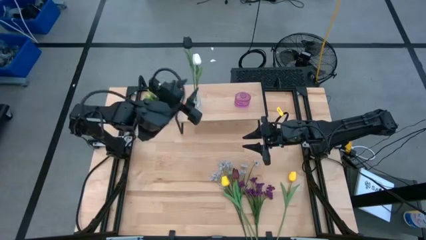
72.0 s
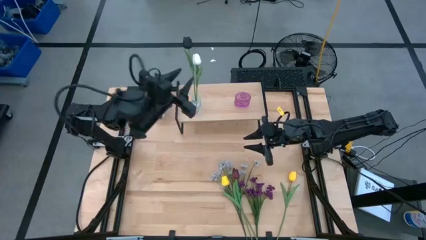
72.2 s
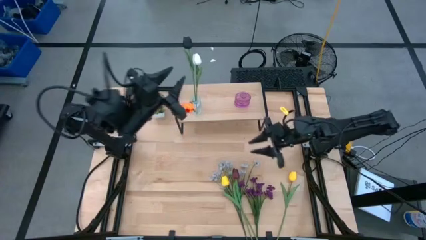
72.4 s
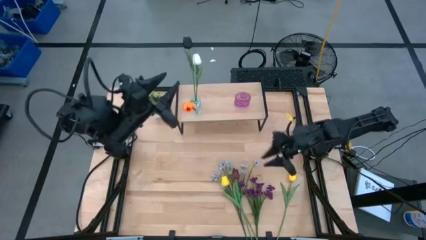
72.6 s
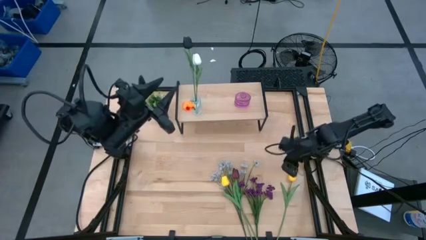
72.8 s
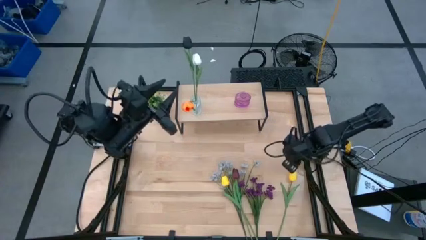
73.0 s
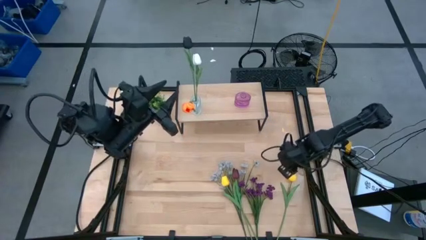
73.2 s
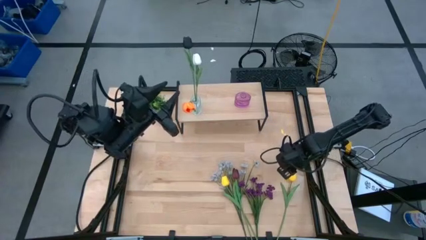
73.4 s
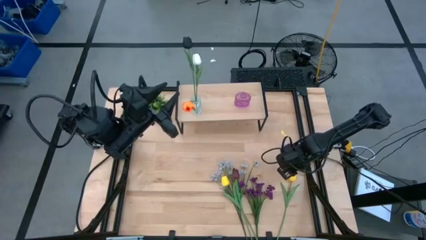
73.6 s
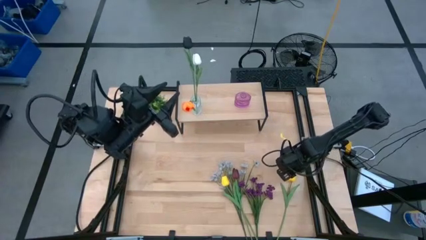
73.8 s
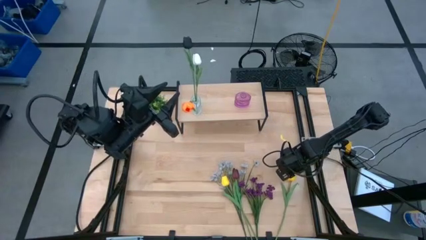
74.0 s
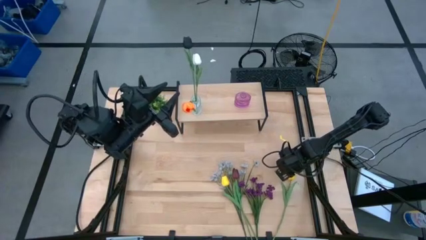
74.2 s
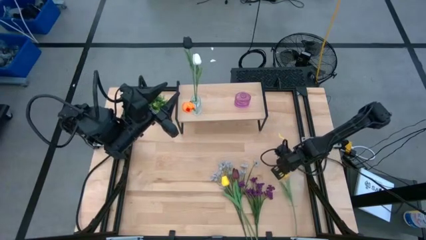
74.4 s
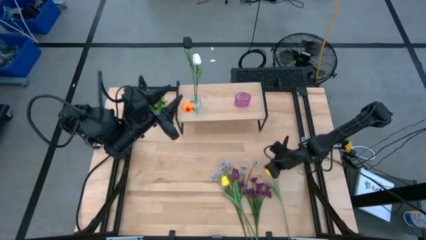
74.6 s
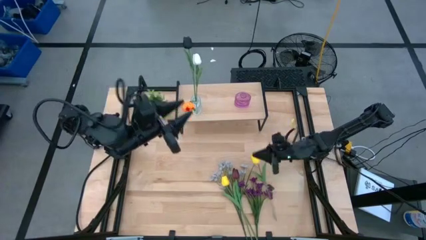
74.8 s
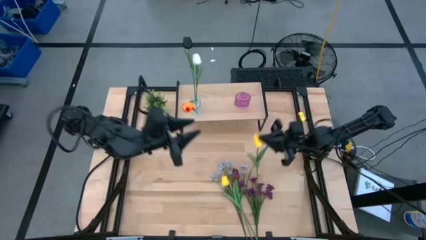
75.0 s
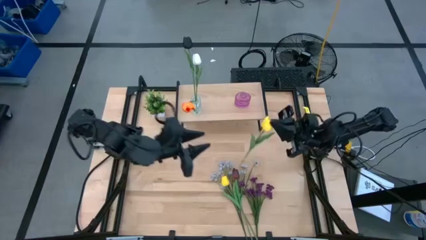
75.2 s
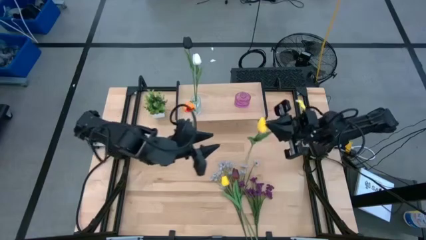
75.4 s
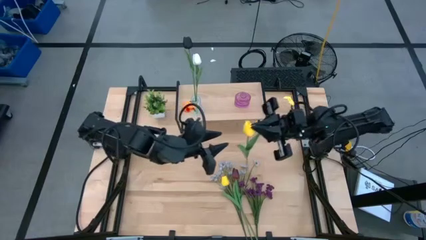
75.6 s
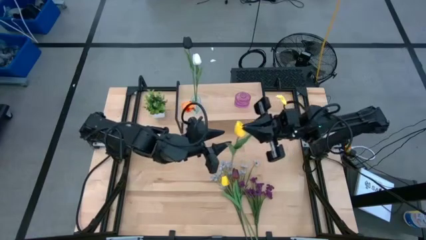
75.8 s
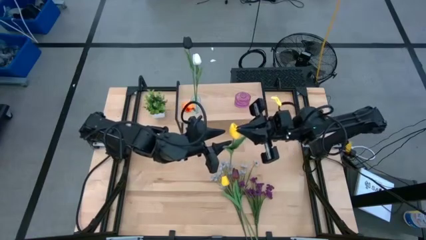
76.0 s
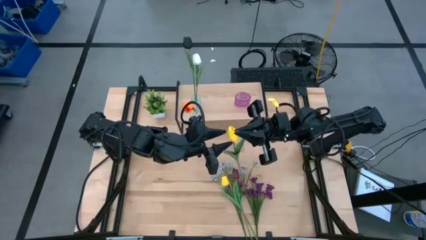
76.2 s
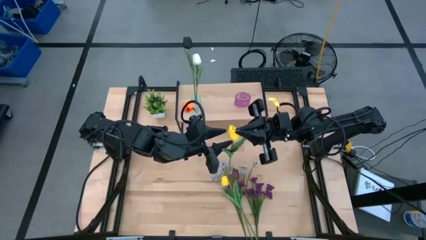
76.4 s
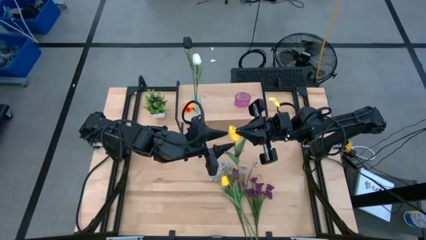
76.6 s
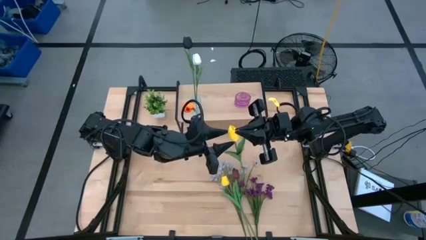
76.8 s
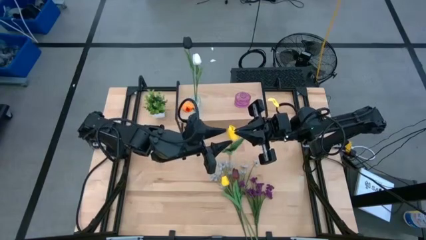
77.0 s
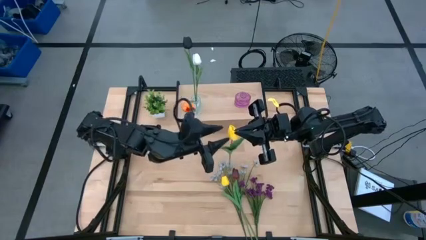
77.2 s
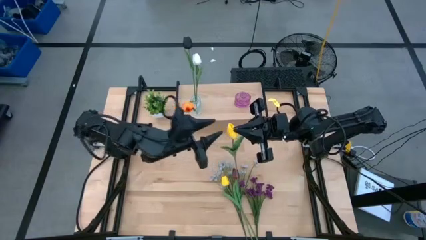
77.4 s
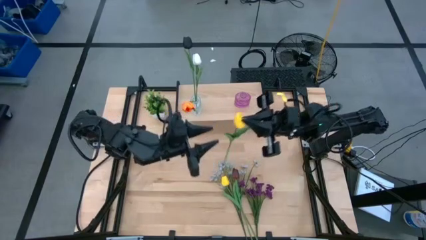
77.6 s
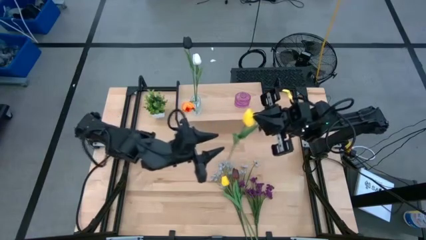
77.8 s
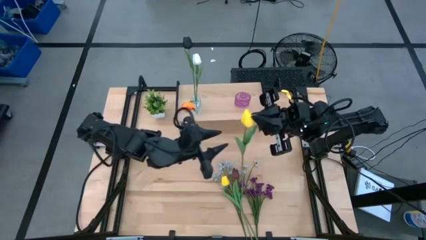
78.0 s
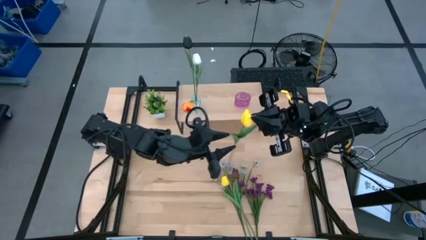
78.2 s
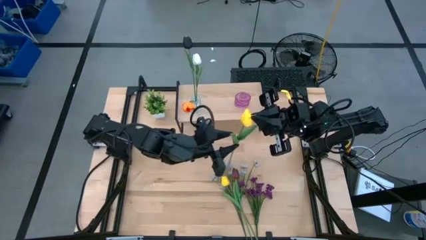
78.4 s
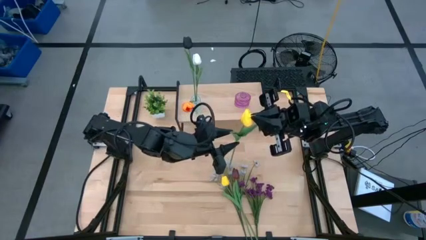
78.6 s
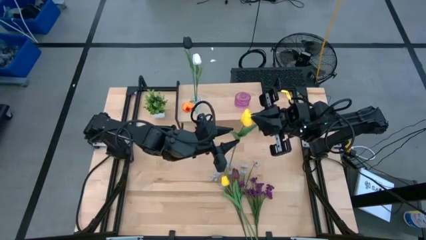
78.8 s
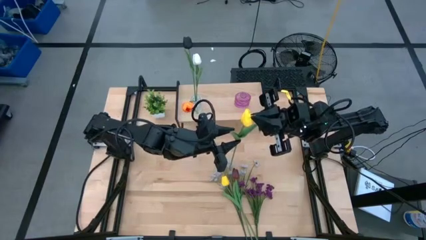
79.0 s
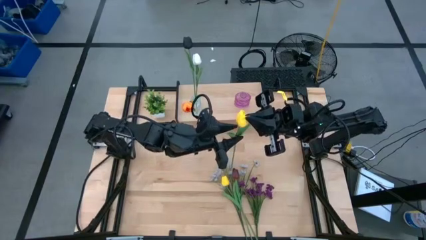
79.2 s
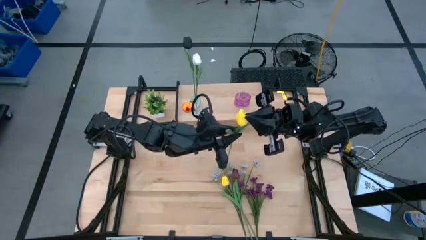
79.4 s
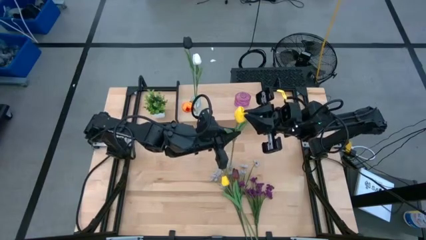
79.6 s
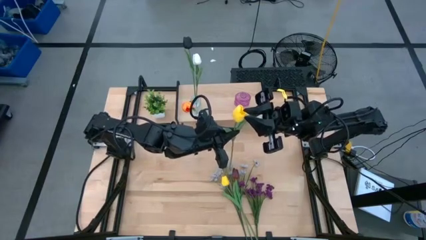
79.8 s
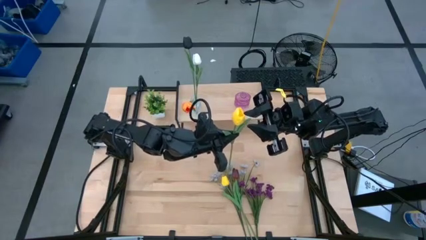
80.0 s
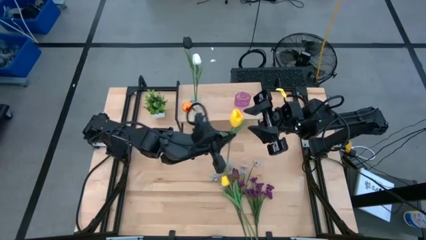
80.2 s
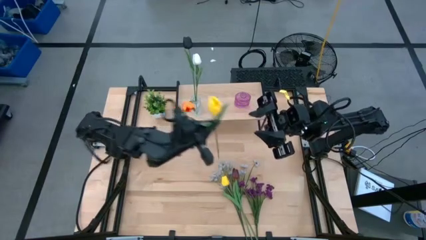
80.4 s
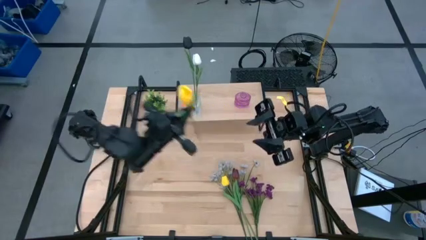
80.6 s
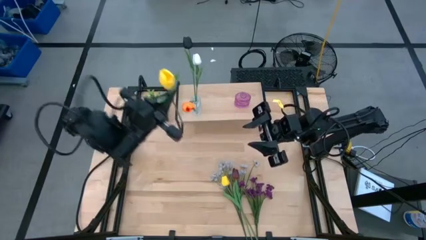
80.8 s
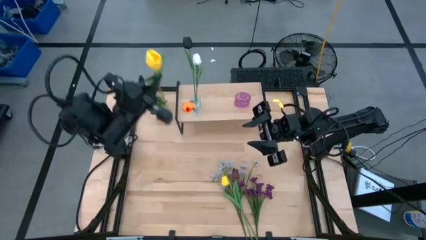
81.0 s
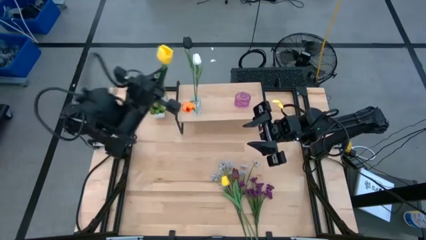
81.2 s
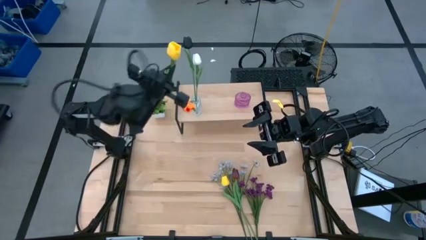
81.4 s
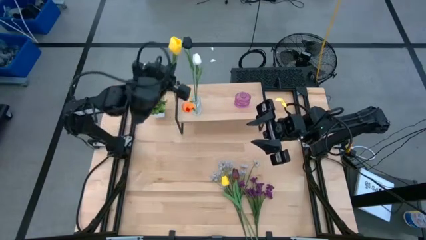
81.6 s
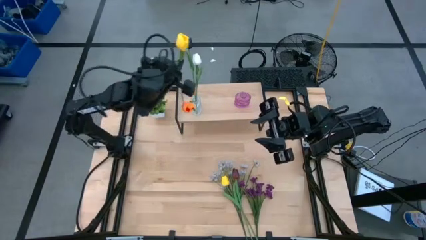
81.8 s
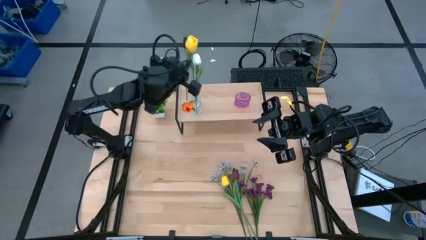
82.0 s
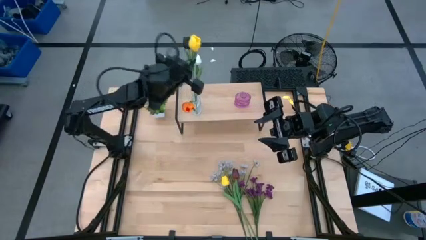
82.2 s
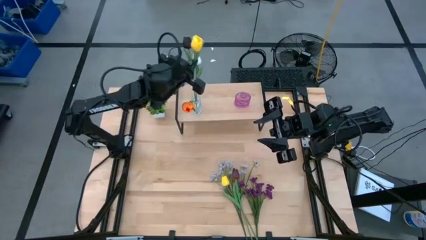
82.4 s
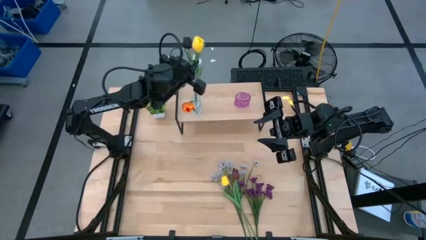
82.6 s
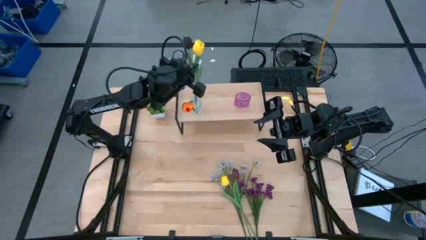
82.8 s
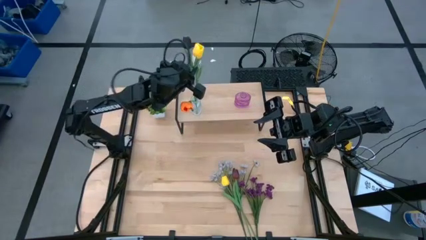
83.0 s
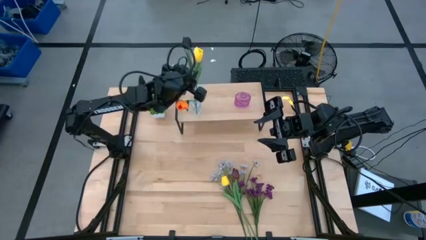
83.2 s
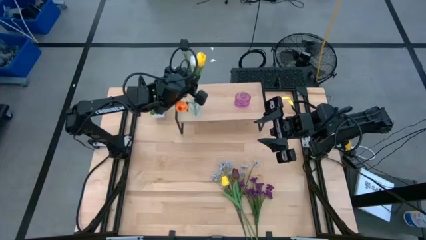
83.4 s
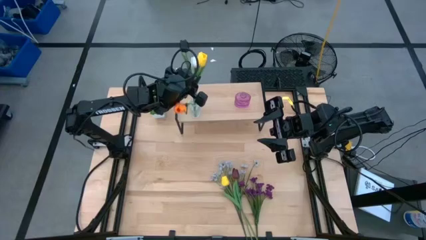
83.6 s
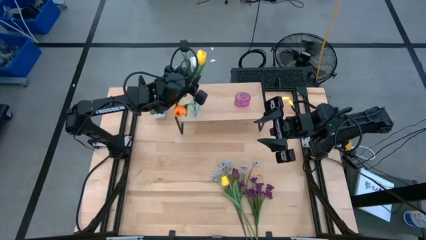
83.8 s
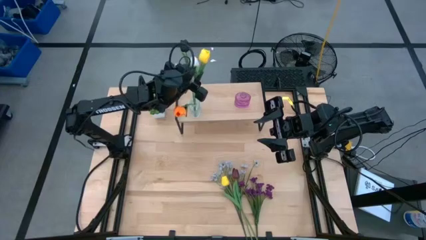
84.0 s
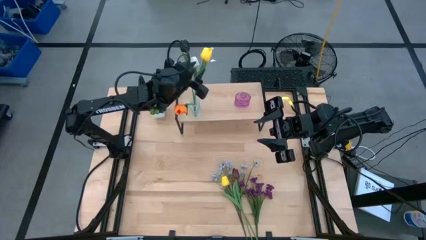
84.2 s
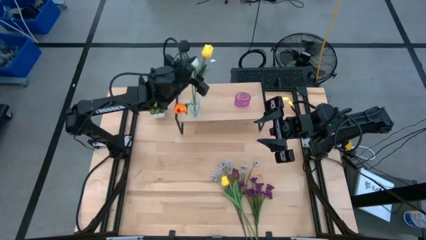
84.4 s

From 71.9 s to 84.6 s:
Task: Pick and place flowers into a vace then onto a shelf
Put the yellow tulip into the white vase
